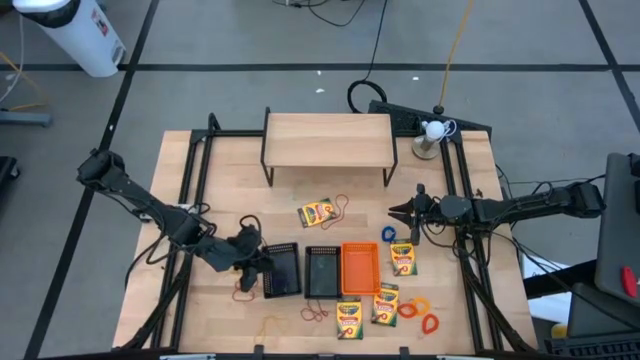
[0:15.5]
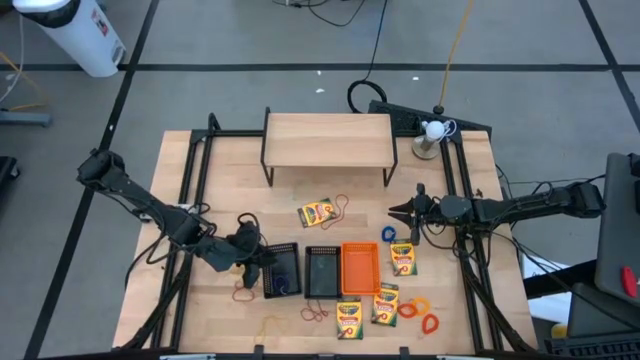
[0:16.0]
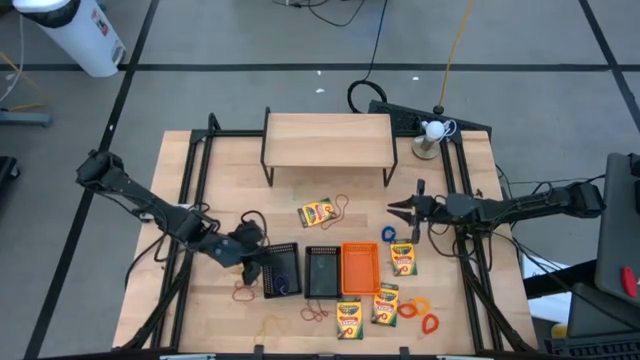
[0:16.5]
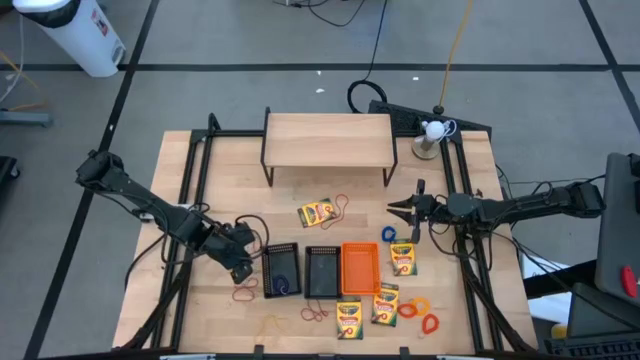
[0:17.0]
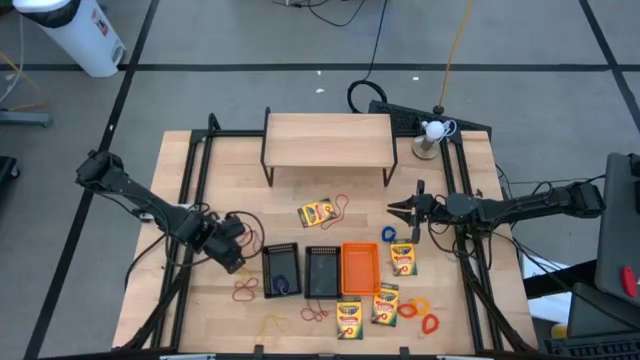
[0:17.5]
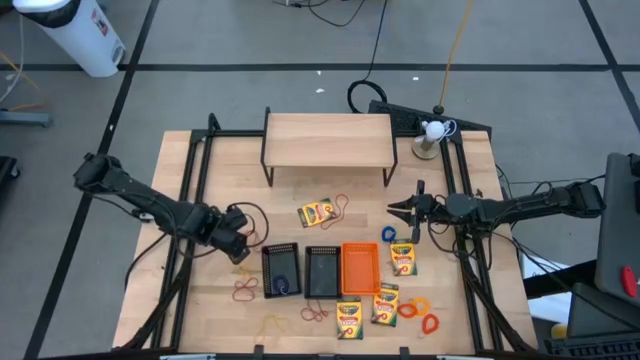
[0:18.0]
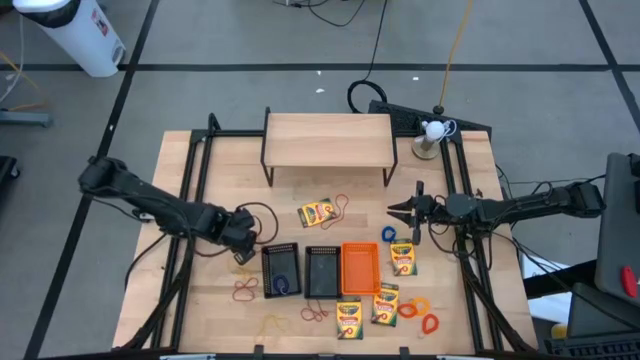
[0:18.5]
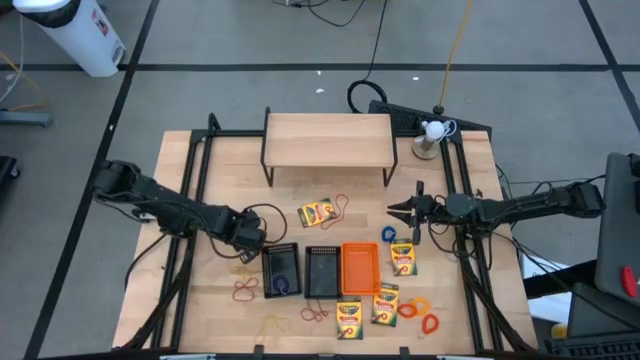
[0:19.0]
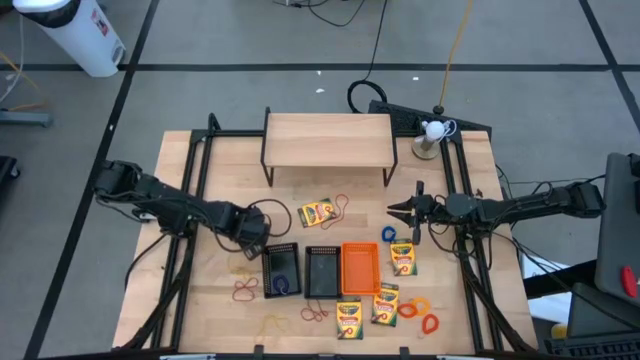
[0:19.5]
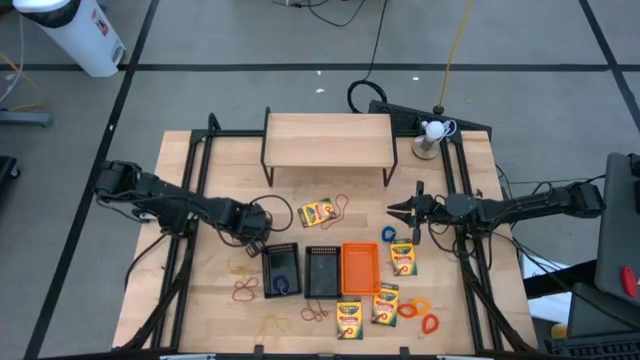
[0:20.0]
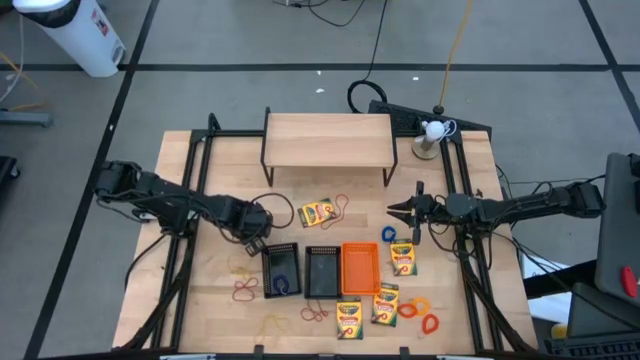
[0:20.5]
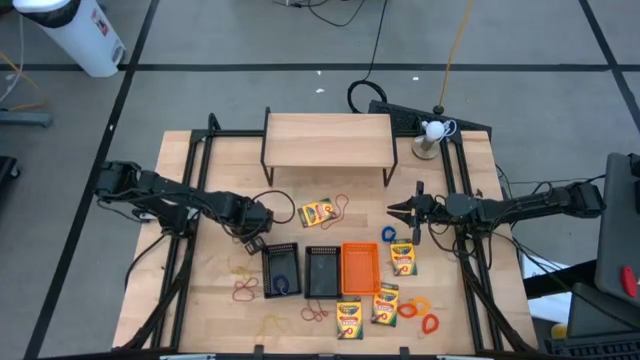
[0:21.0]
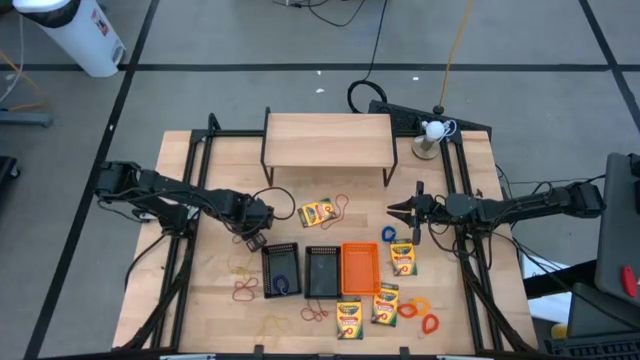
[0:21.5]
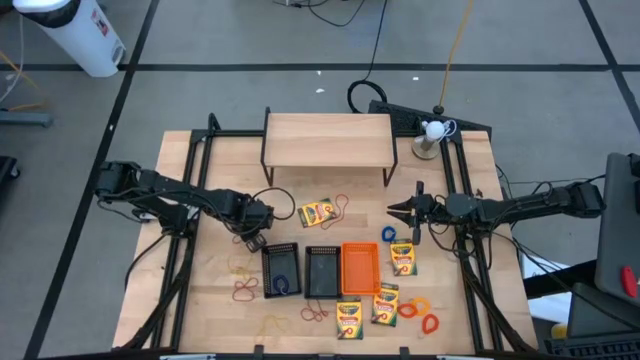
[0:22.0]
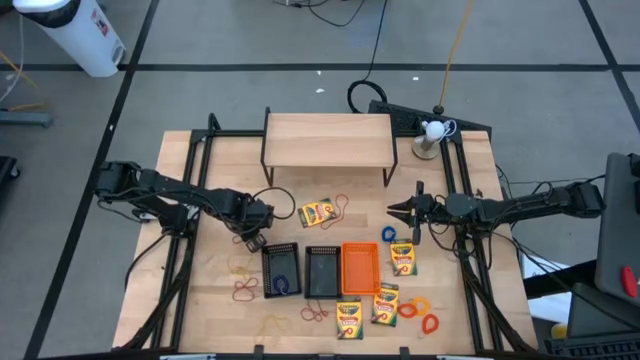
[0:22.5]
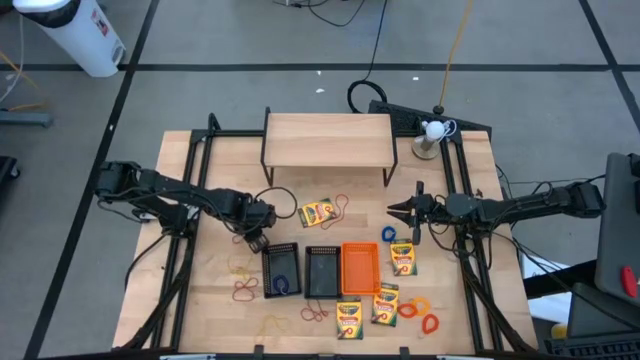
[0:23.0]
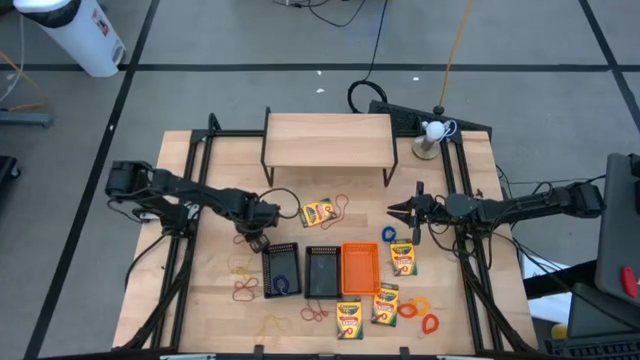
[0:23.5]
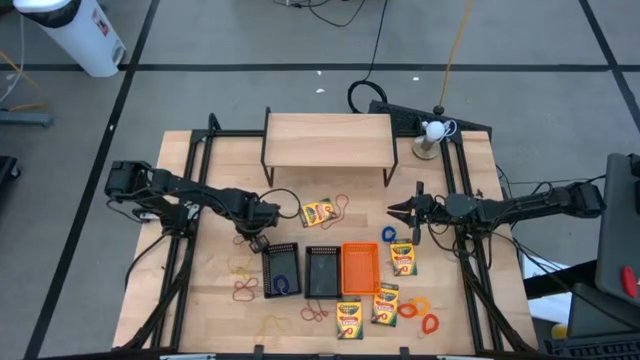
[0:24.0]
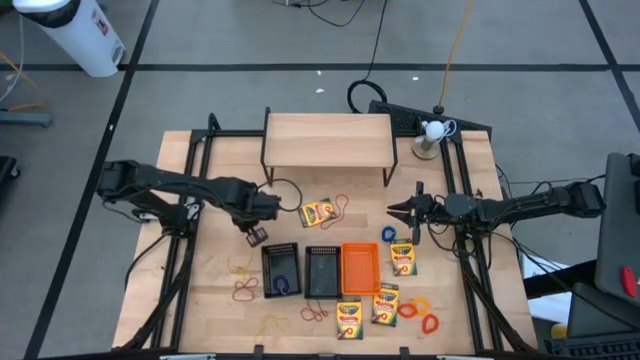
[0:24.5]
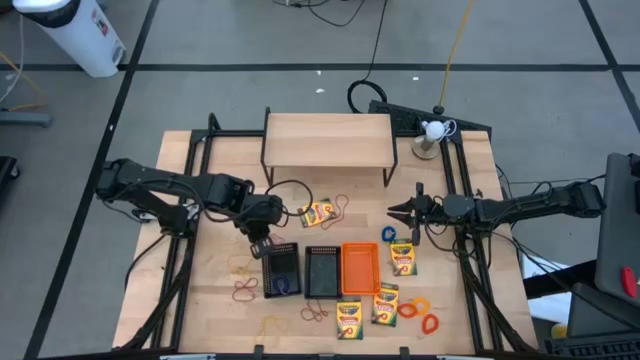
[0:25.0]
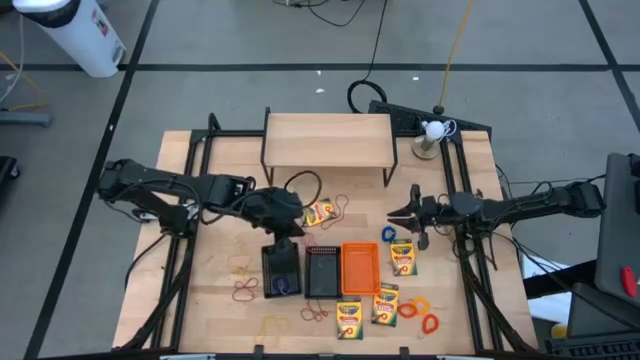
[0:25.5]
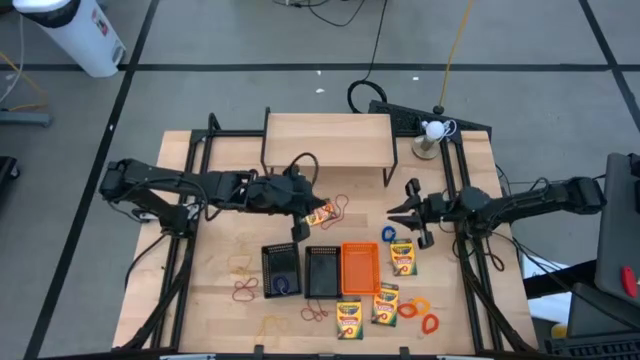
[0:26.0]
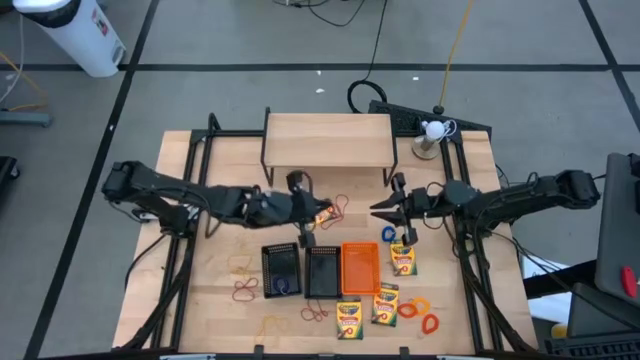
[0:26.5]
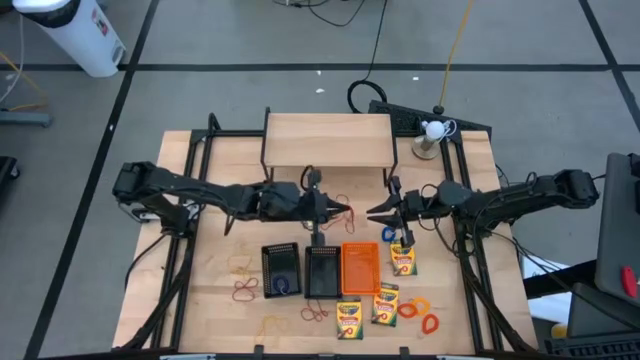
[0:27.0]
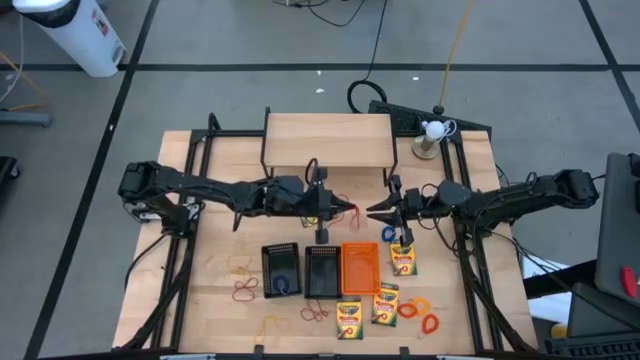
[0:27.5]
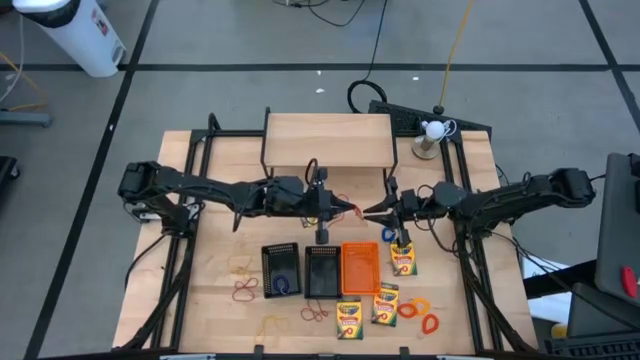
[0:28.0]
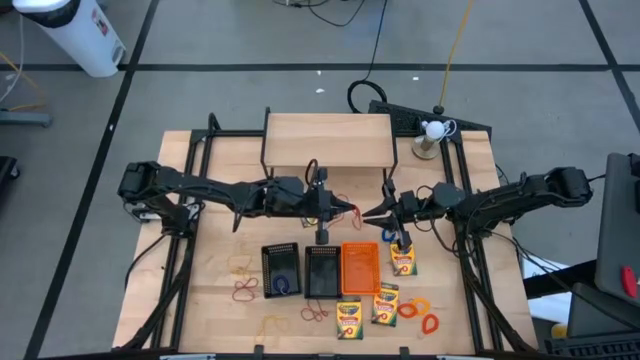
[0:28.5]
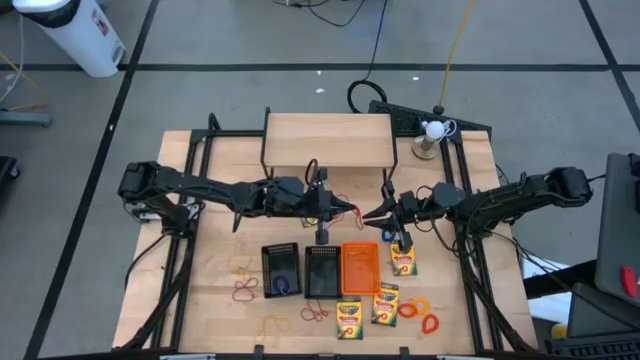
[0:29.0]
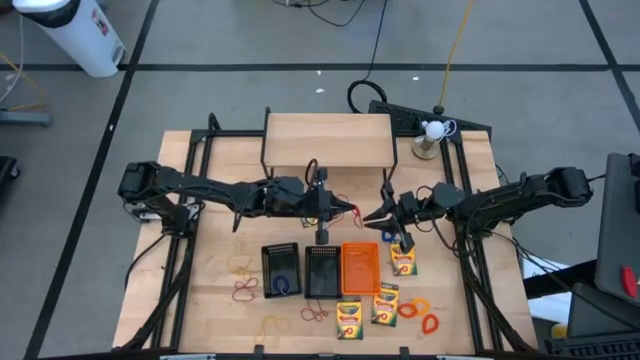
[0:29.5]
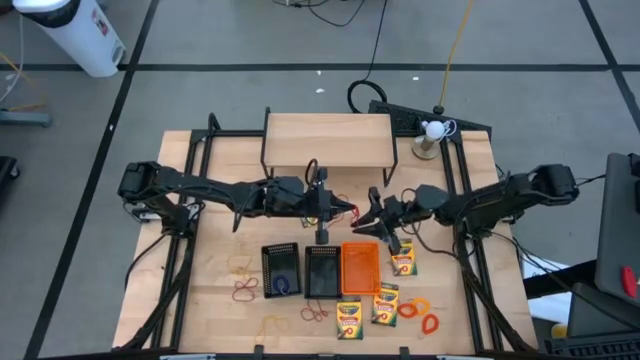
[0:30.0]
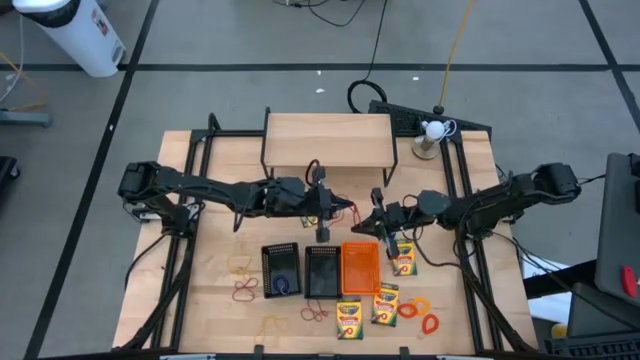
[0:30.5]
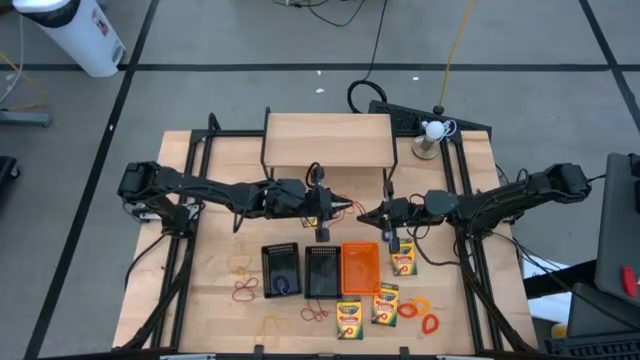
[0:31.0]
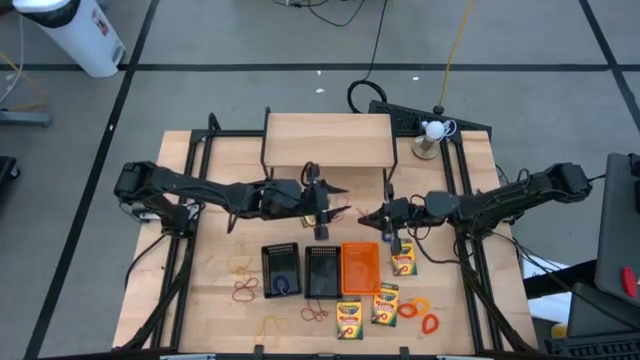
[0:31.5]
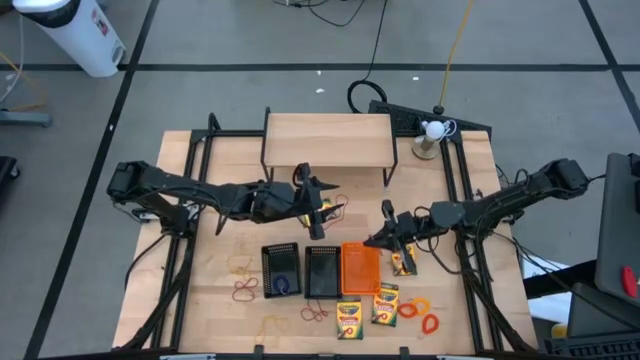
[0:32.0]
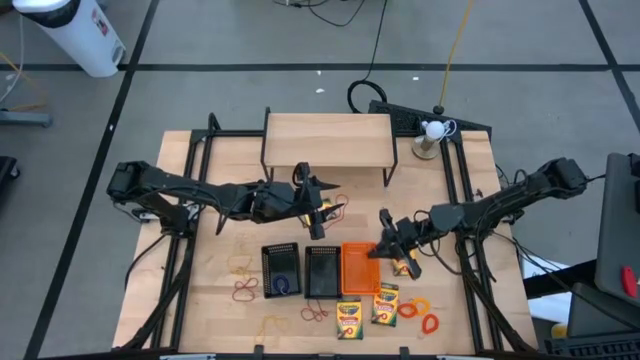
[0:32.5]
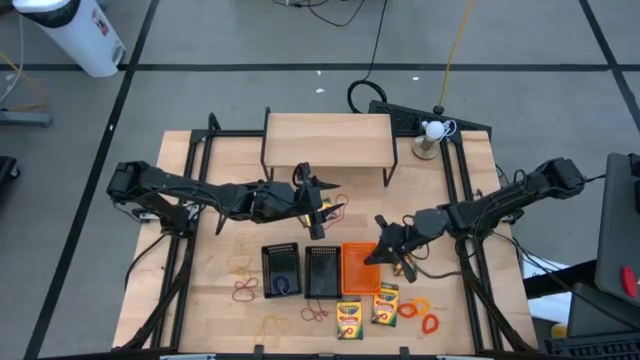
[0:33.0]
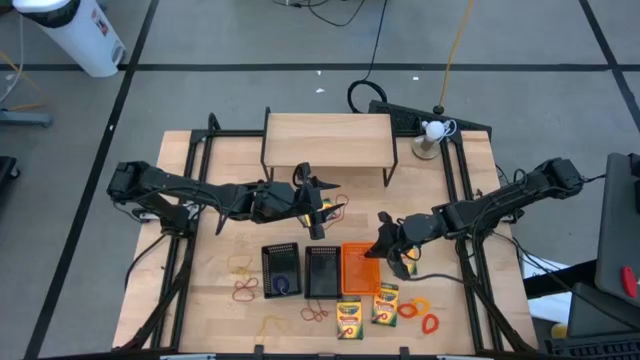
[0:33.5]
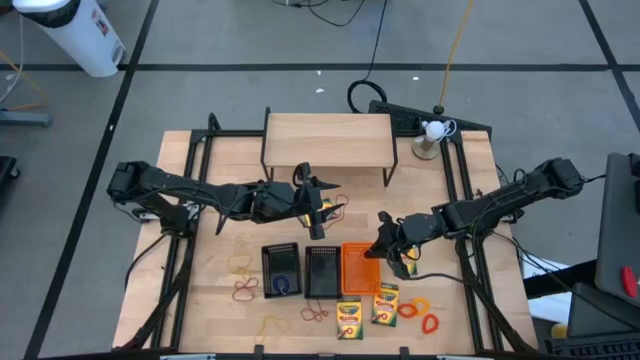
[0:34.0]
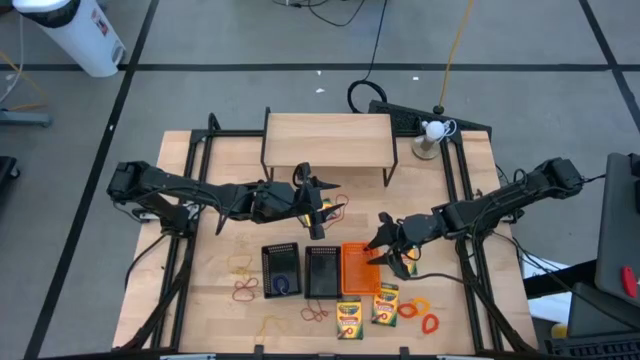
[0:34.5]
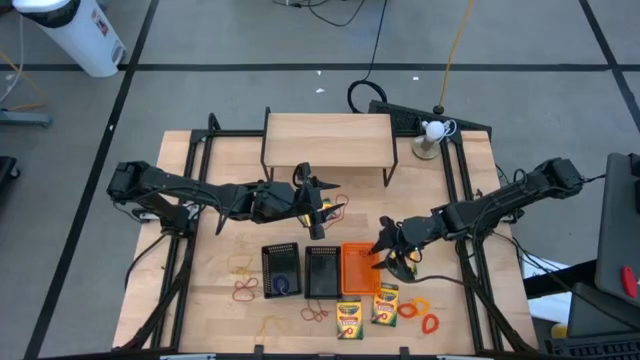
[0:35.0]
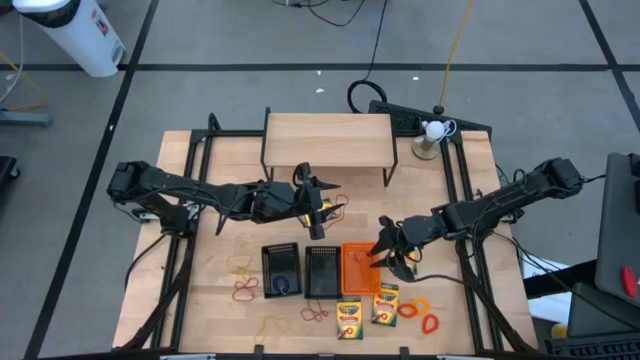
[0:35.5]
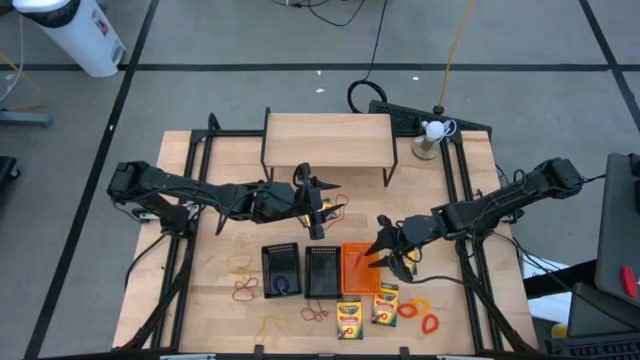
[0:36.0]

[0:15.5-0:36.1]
Task: Pick & Place Office Desk Supplies
Put the red rubber band into the orange bin
